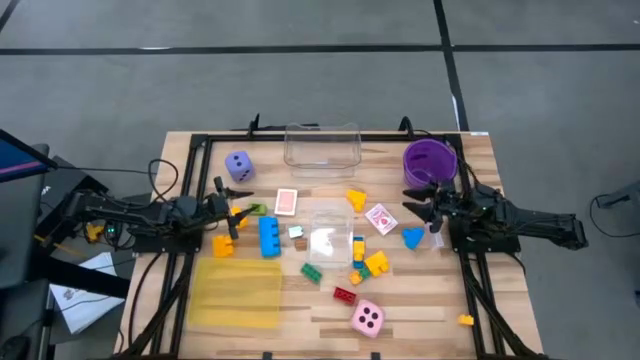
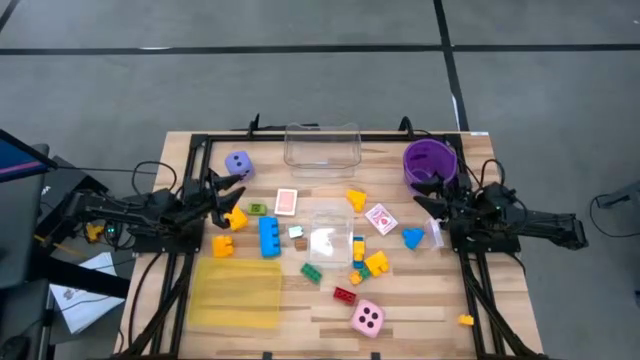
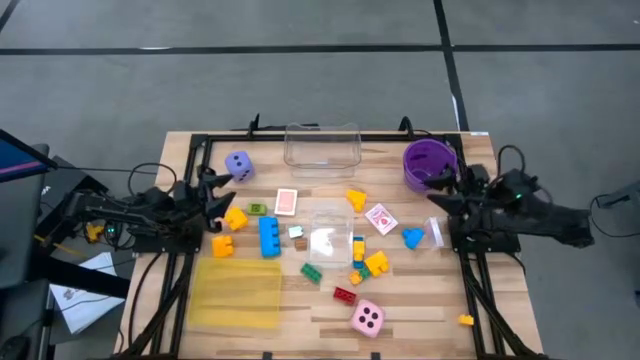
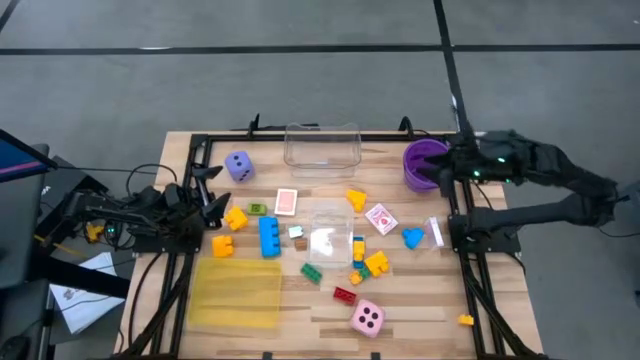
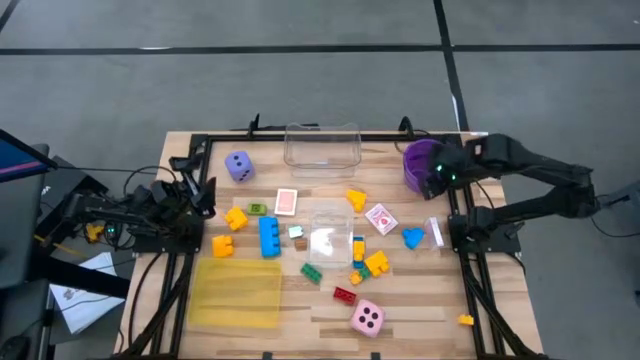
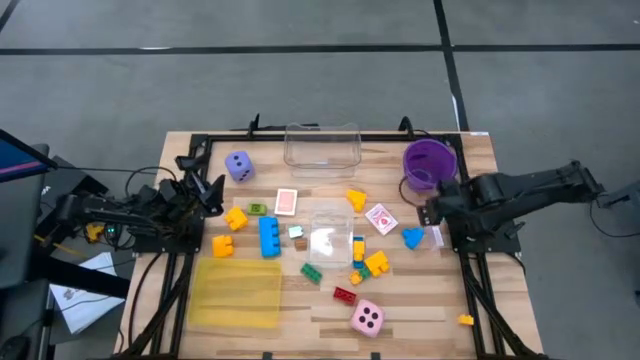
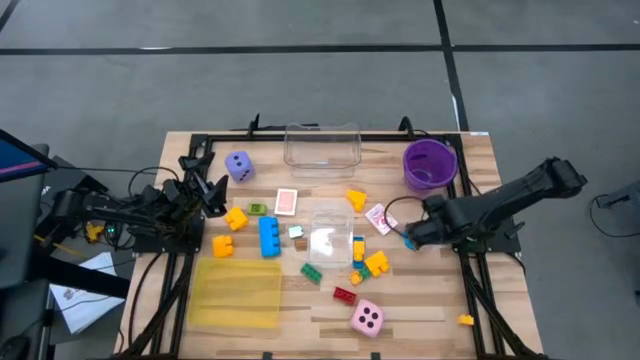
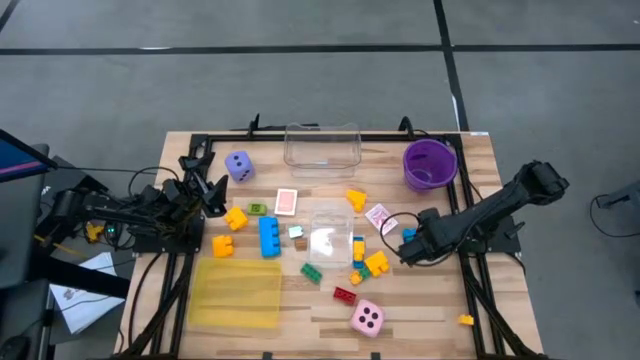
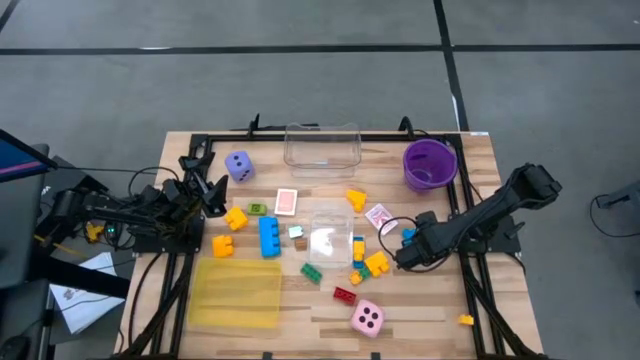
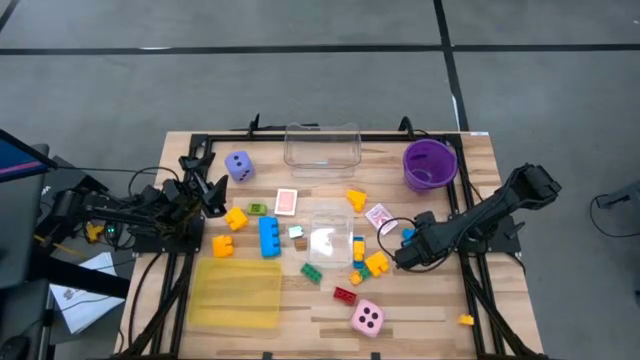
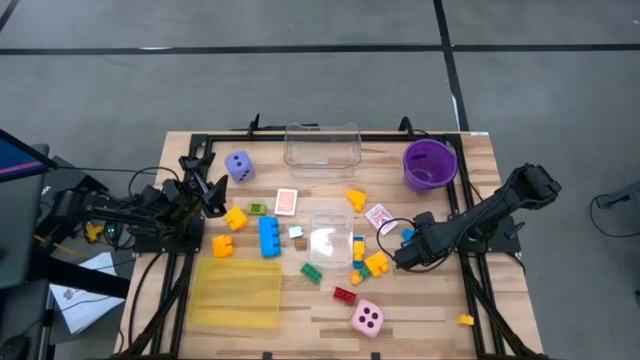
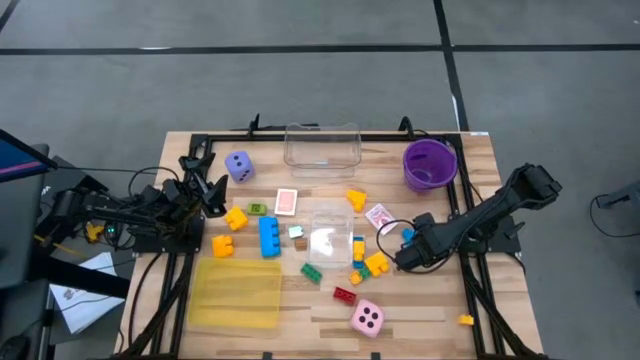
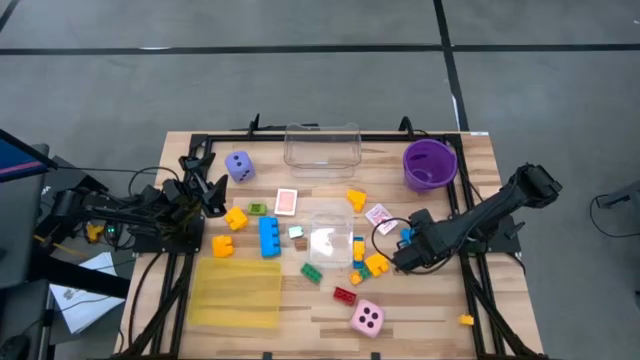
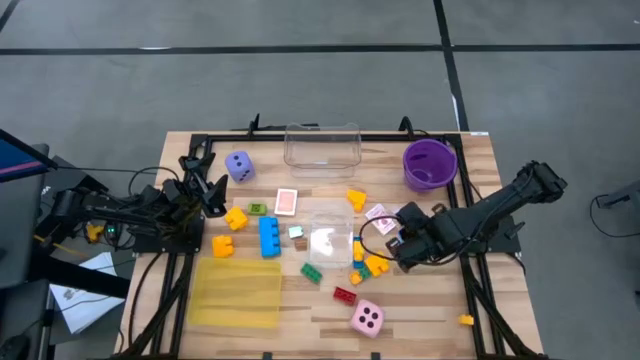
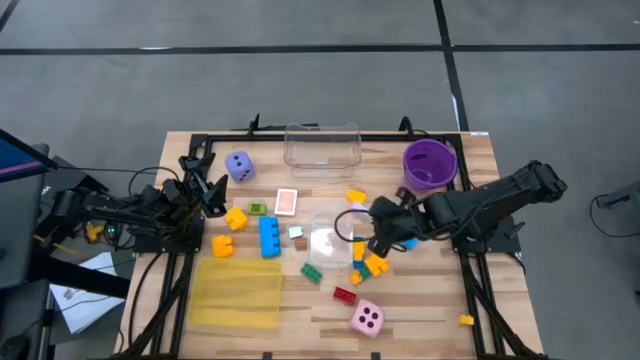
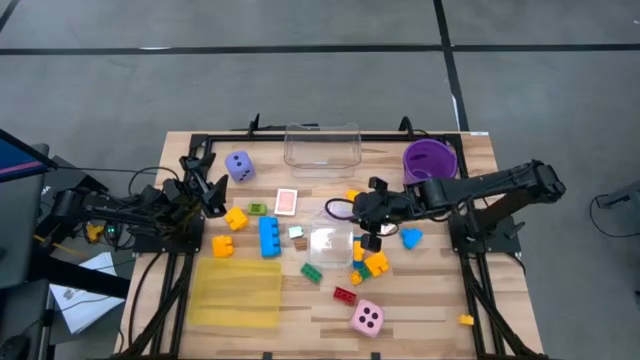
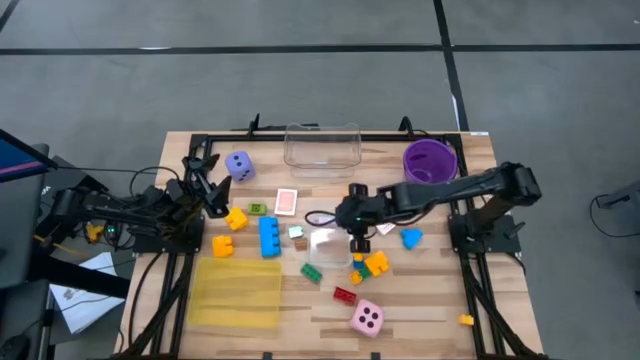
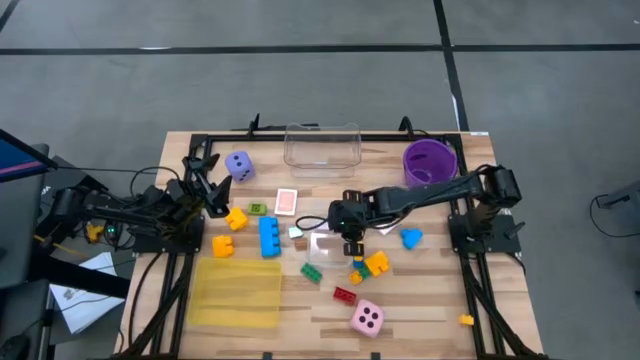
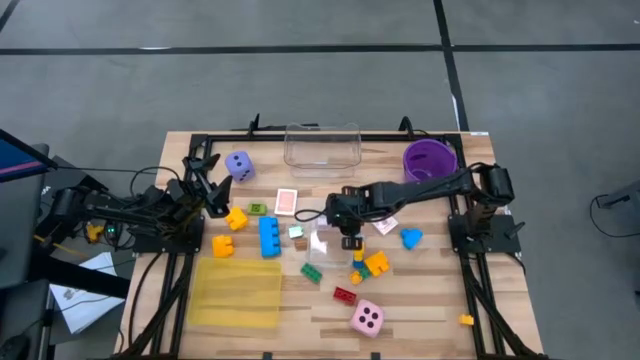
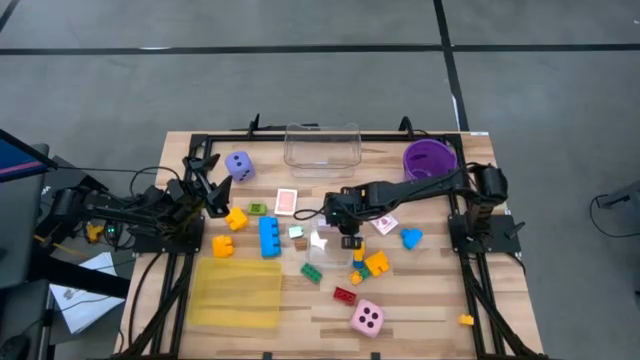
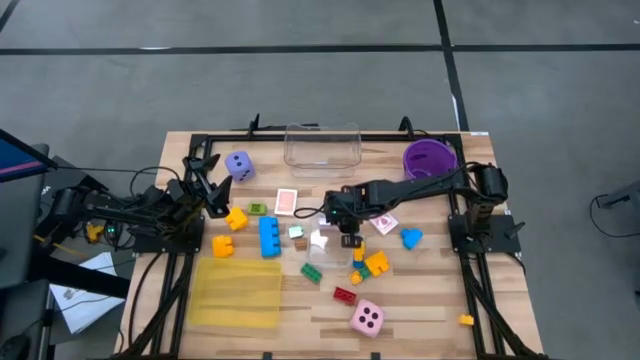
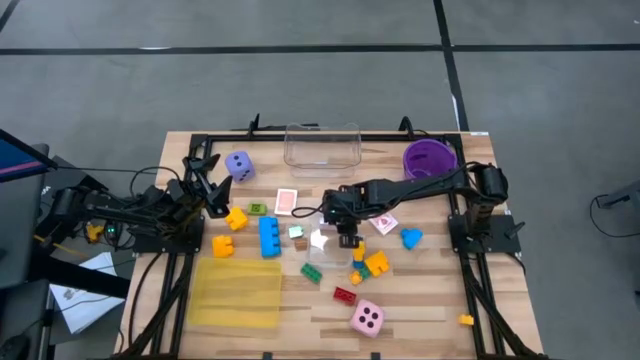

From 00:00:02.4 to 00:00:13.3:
Task: Pick & Place Toys
Put the pink playing card box into the bottom transparent bin

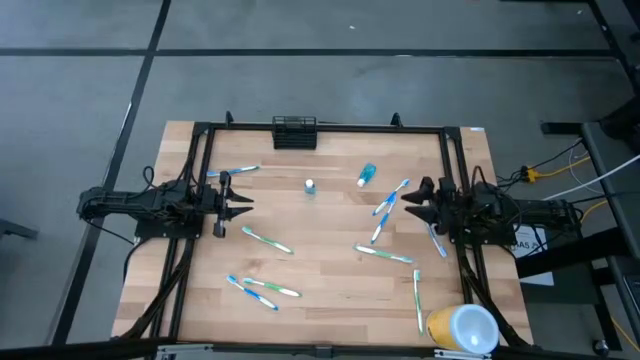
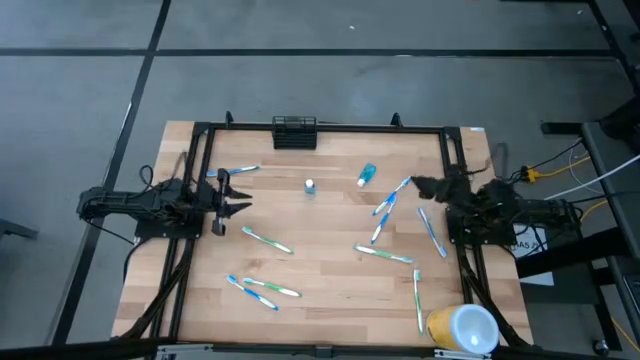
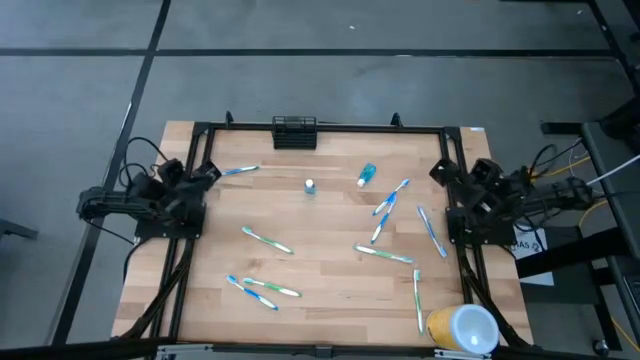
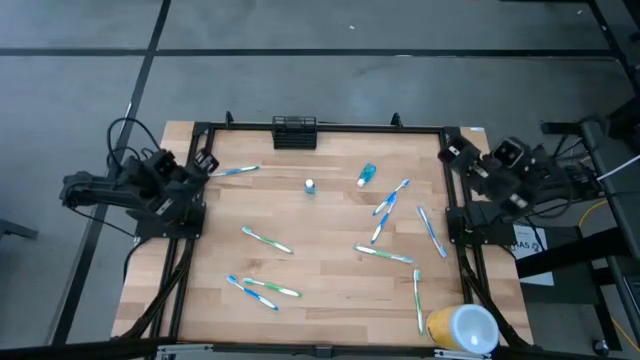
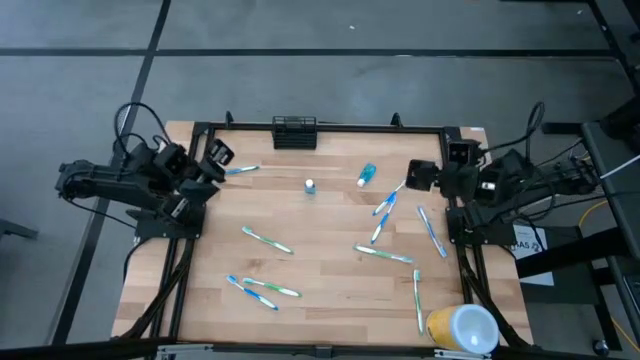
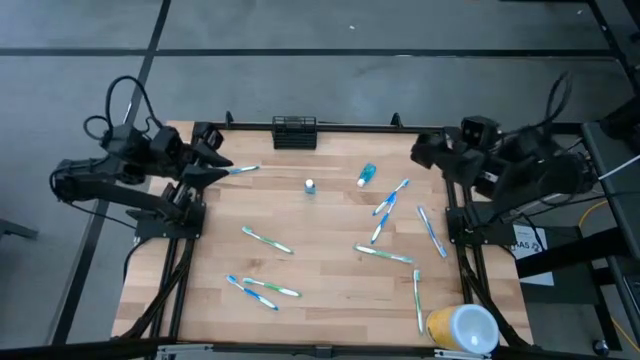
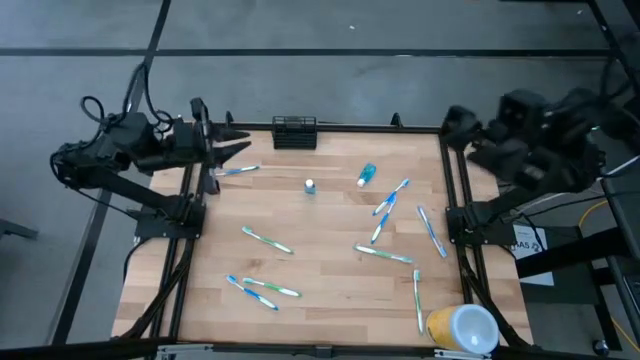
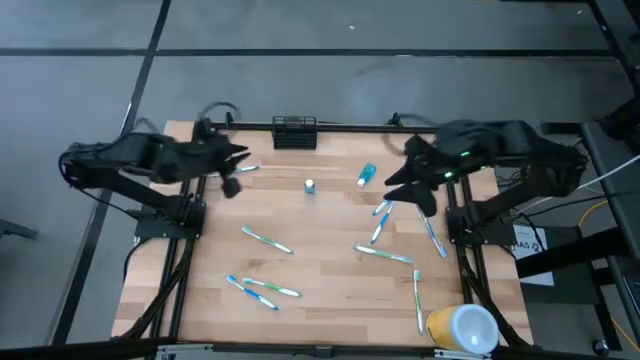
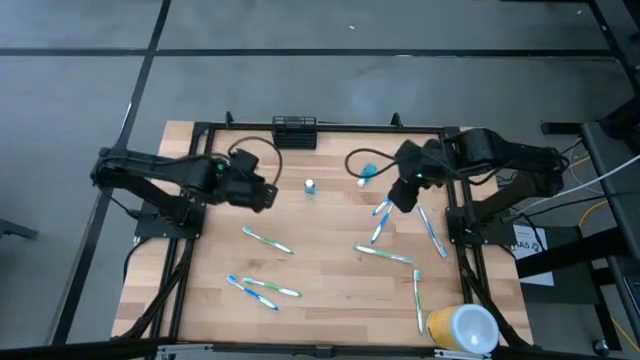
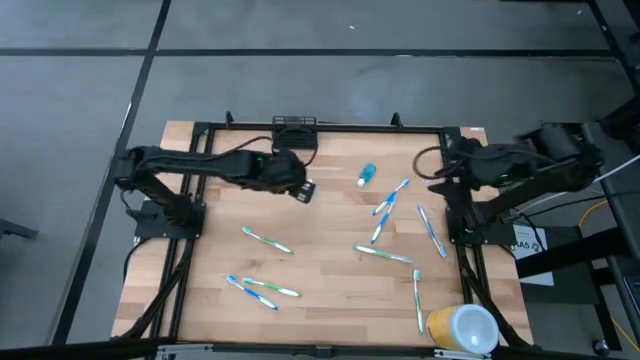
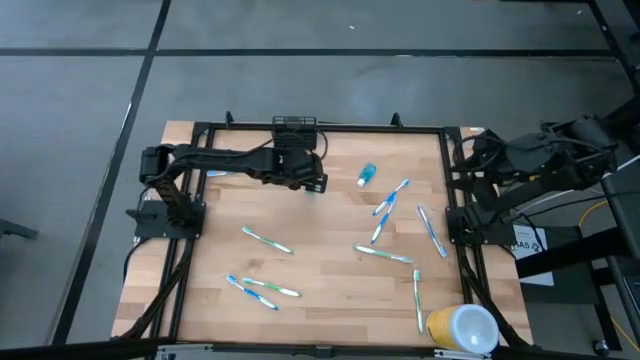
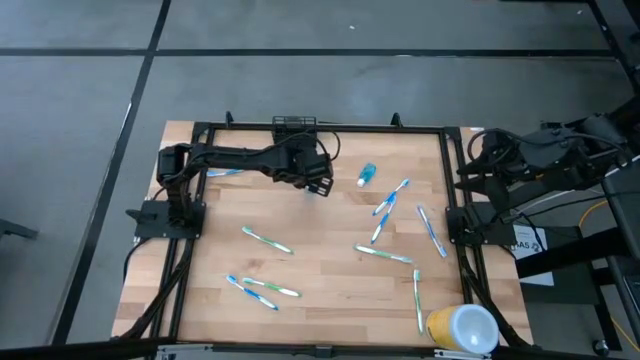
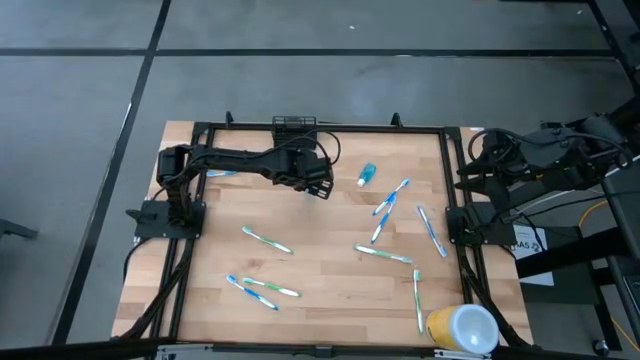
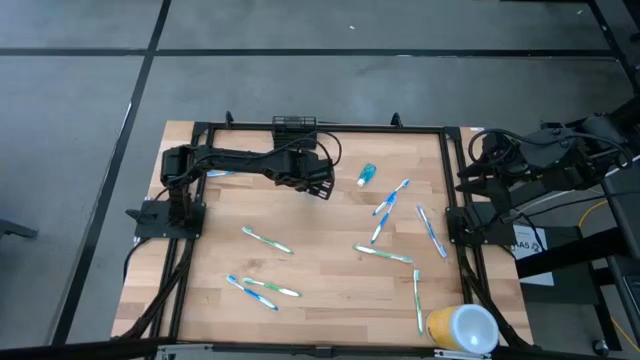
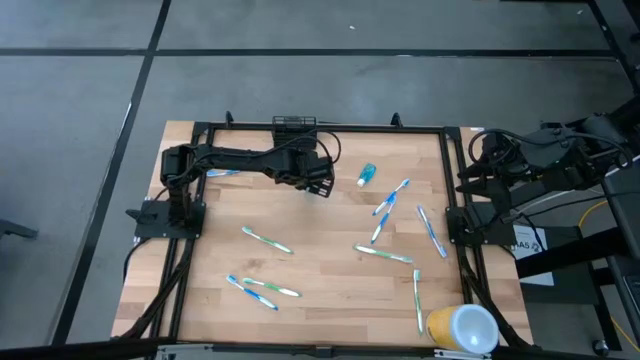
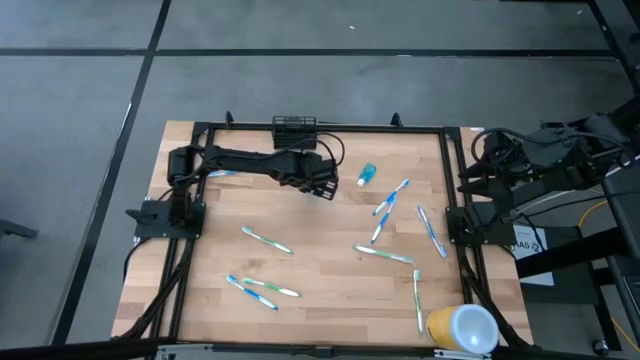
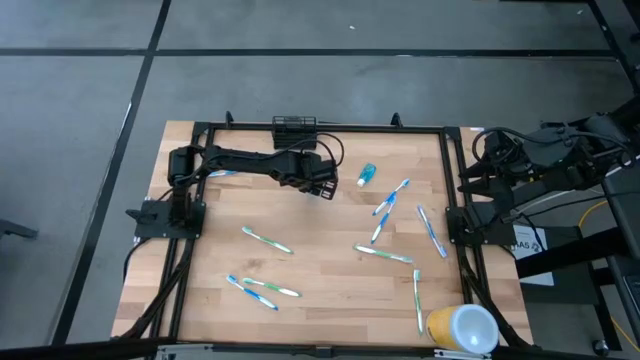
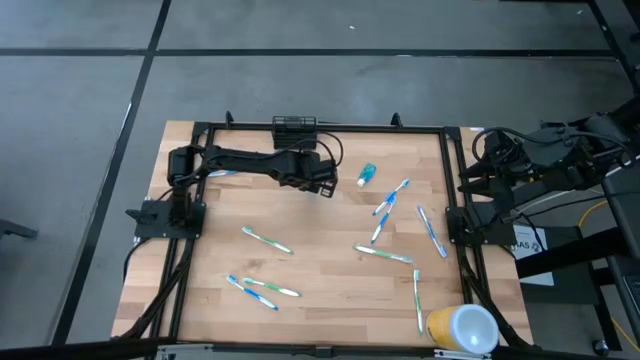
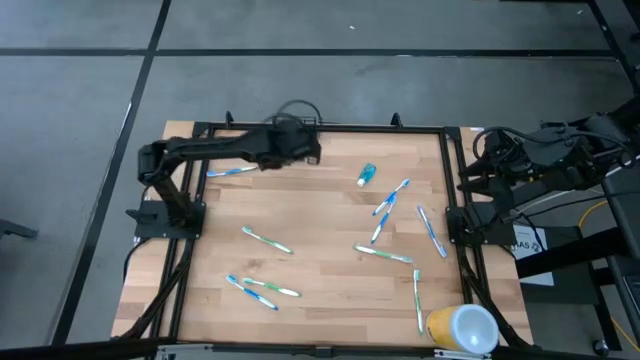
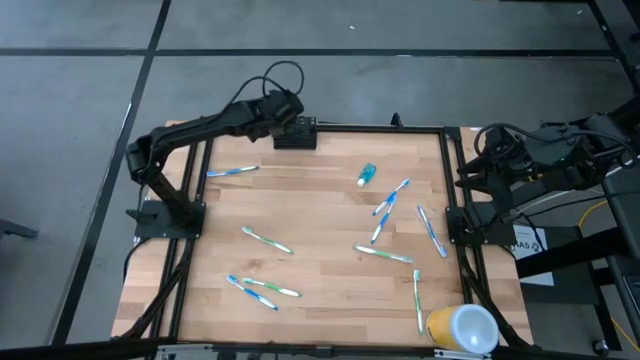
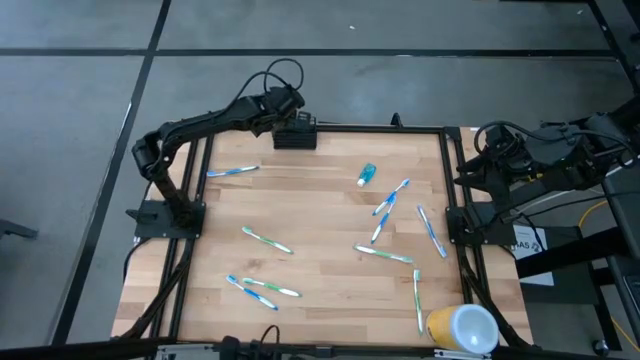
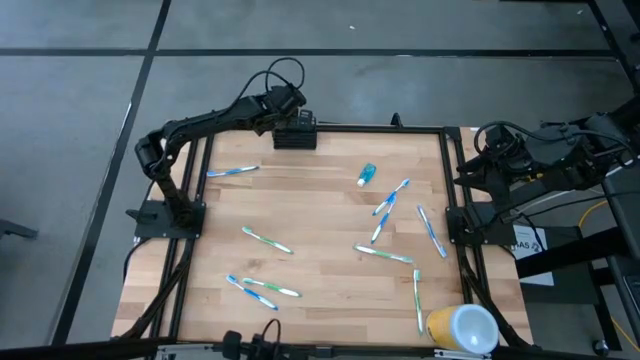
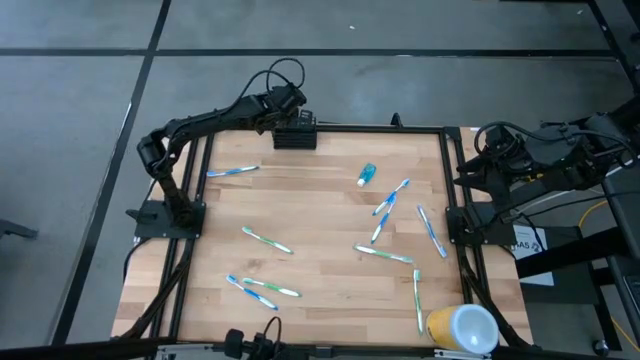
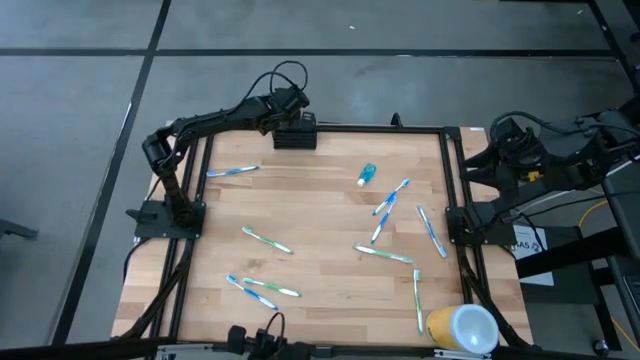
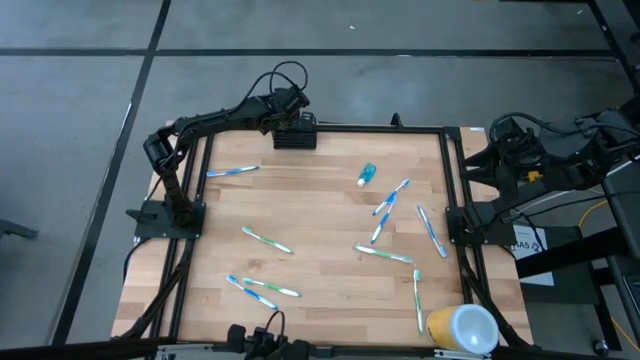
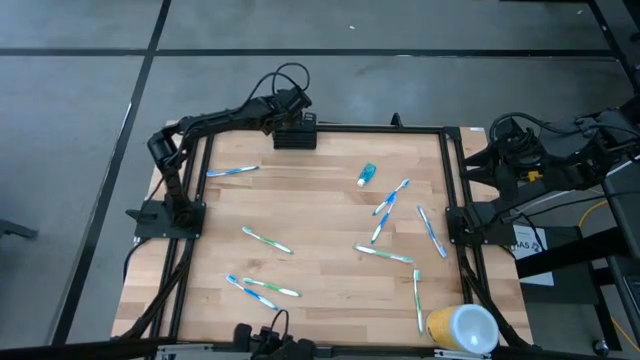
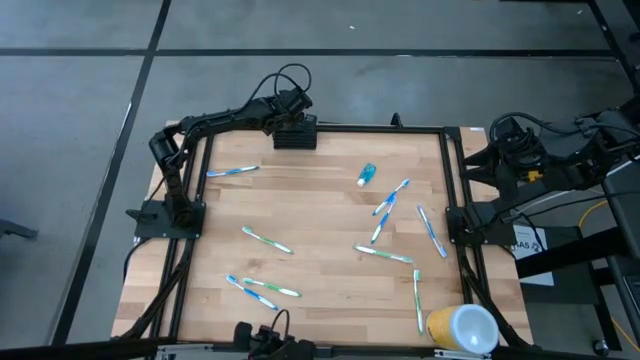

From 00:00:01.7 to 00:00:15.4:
Task: Pick & Place toothbrushing station
Put the blue mouthwash bottle into the black wire organizer
